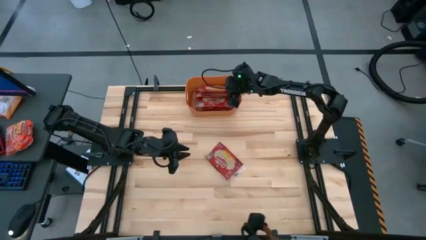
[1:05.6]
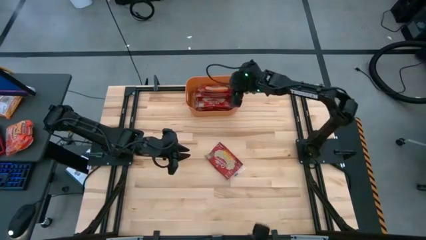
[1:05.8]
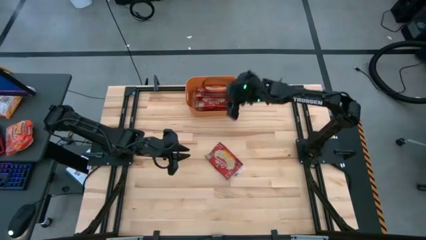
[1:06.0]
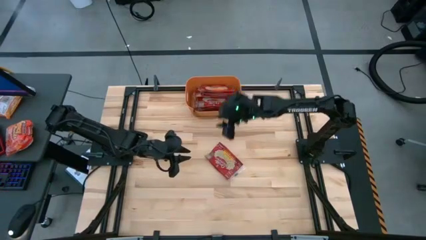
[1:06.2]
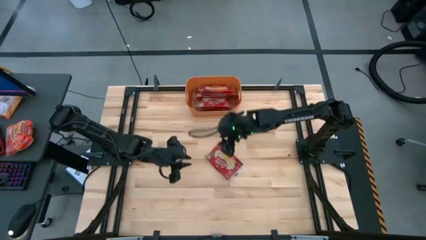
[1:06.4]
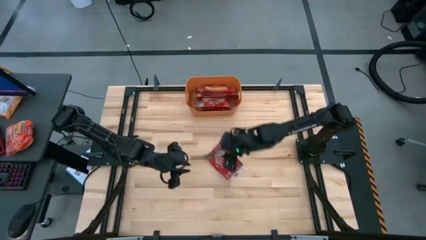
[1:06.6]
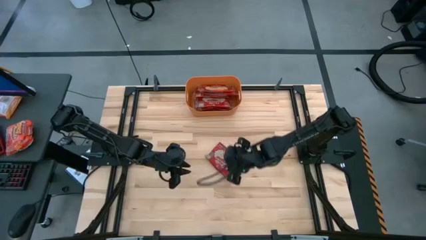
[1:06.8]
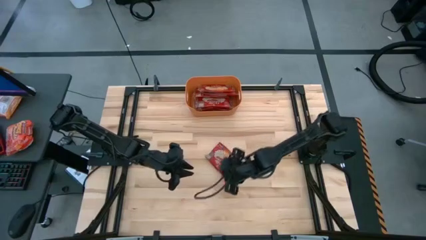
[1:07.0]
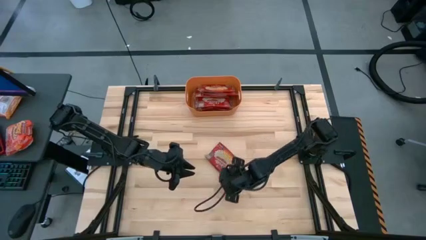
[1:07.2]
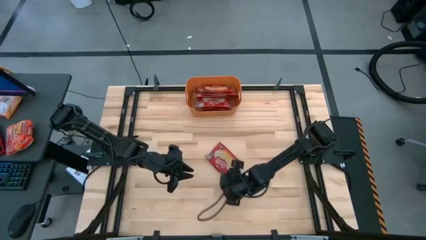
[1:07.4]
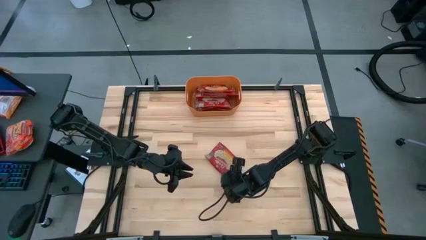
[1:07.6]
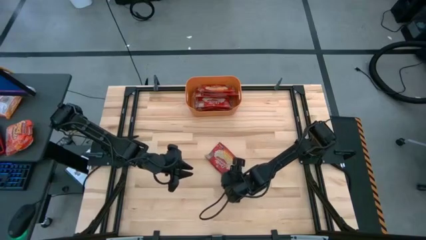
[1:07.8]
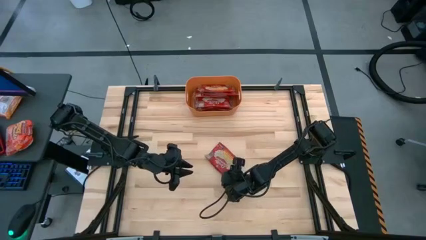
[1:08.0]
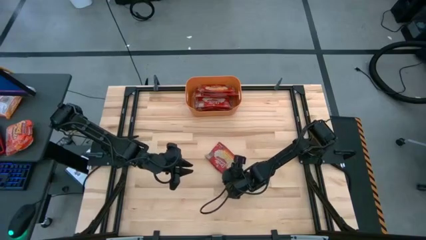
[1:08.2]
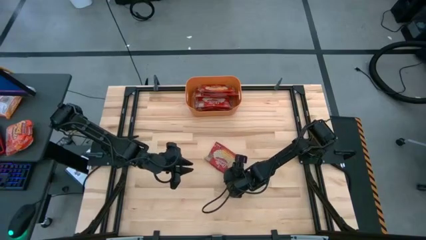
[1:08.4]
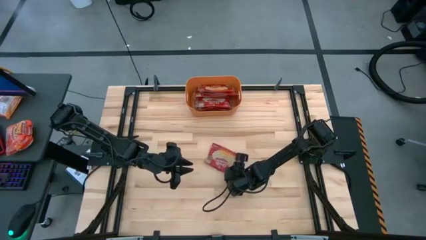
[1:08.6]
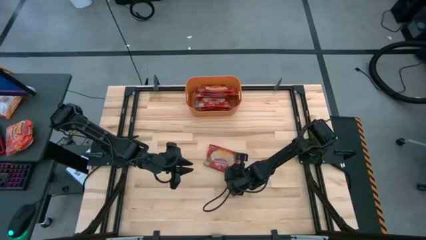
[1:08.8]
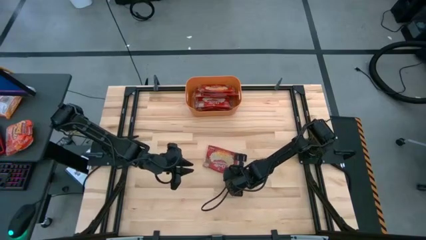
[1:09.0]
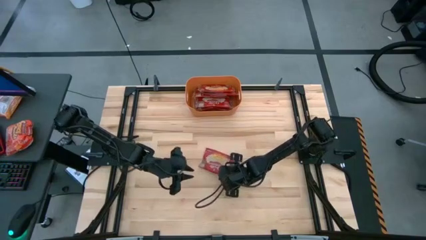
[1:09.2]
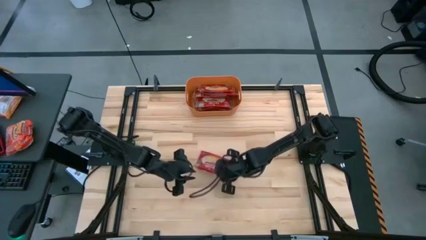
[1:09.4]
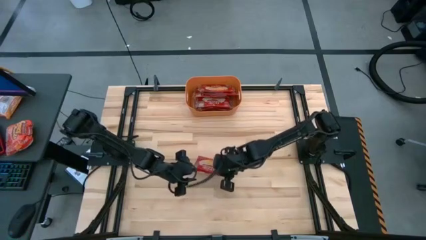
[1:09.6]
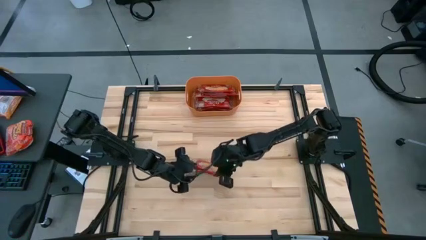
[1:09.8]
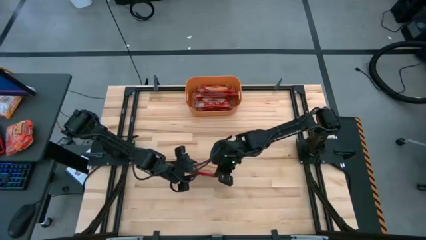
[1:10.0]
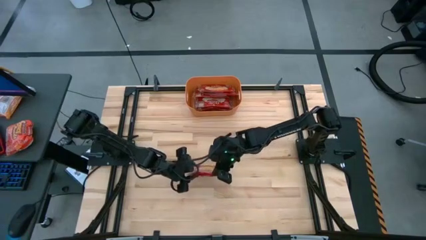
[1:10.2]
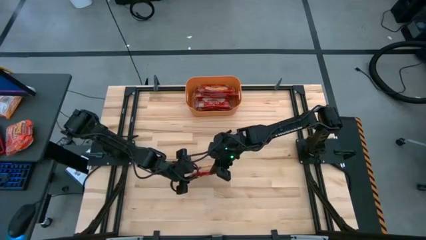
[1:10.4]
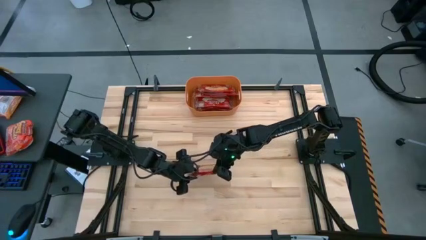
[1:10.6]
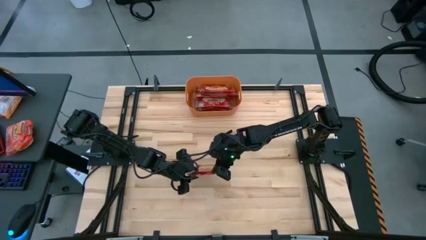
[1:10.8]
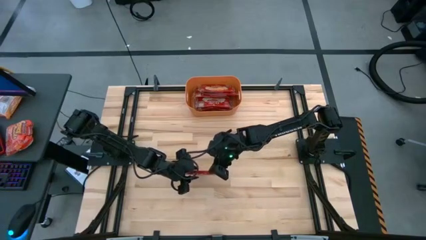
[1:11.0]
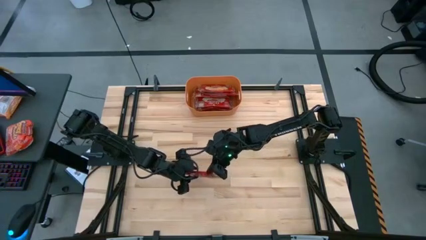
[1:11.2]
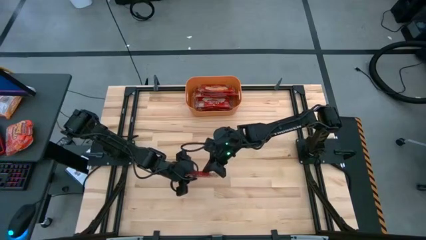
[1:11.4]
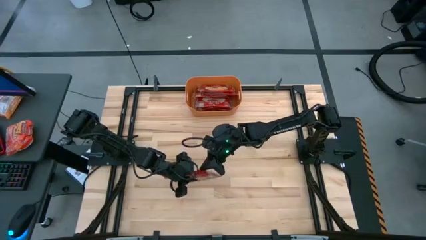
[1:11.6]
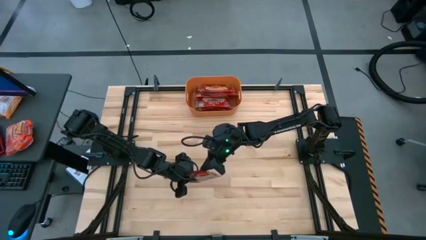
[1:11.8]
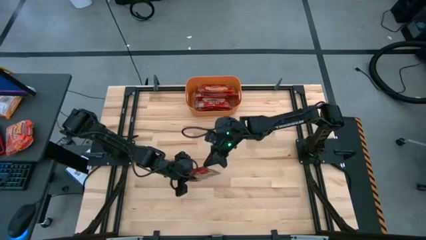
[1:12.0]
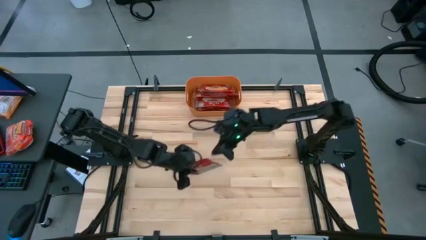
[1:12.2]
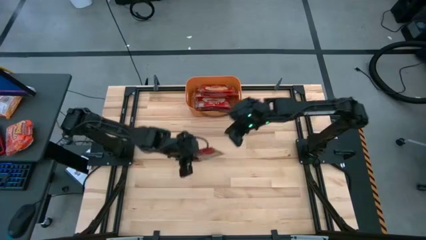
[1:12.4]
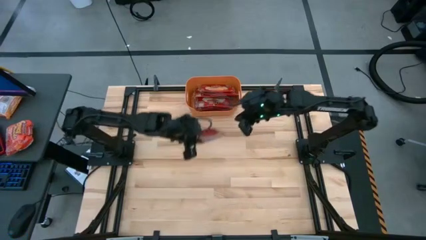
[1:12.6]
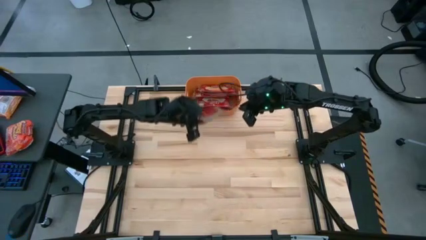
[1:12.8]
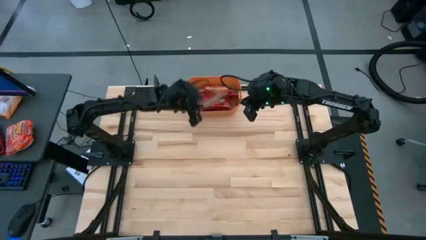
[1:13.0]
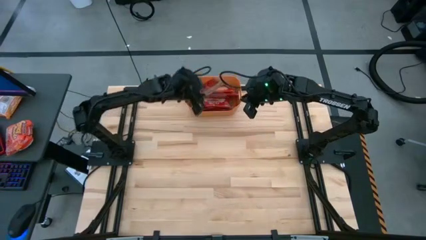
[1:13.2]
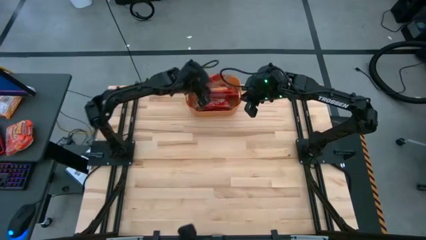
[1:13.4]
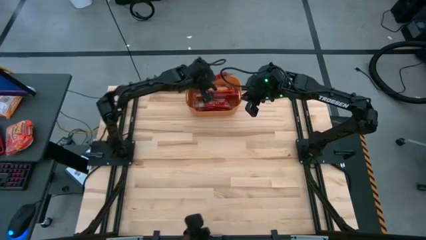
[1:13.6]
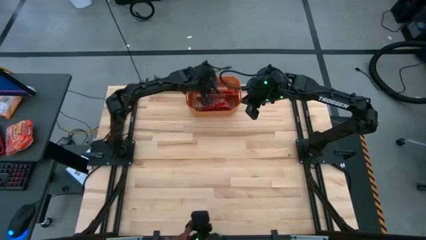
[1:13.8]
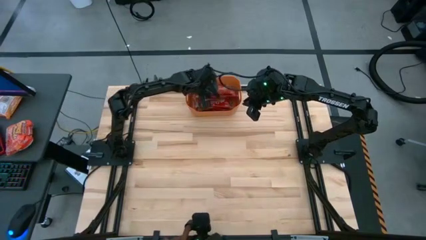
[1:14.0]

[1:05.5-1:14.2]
Task: Sort popcorn bags into baskets
Put the red popcorn bag into the orange bin

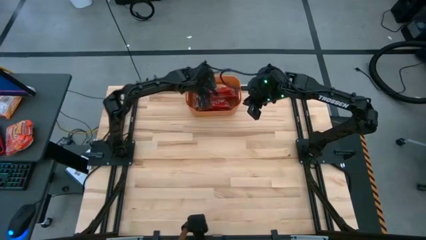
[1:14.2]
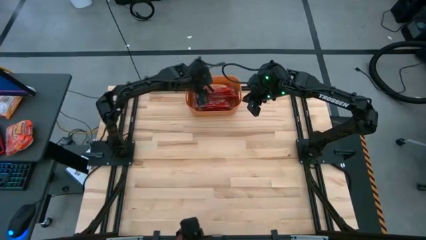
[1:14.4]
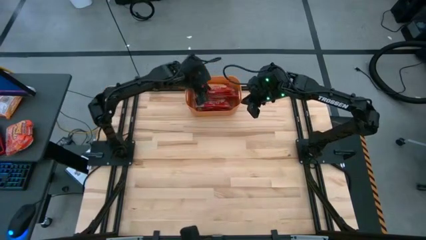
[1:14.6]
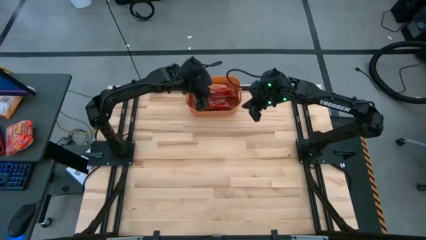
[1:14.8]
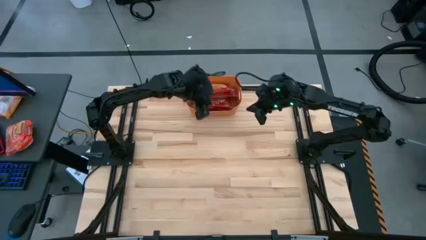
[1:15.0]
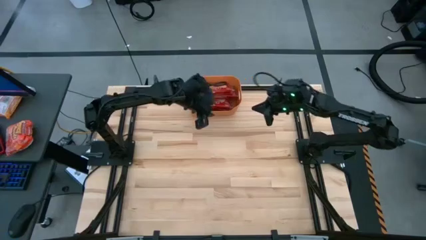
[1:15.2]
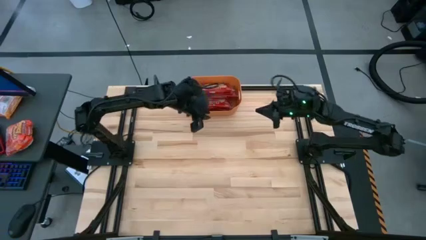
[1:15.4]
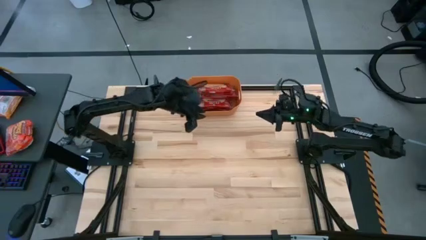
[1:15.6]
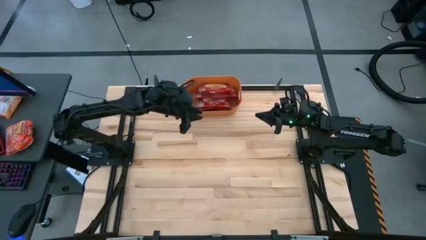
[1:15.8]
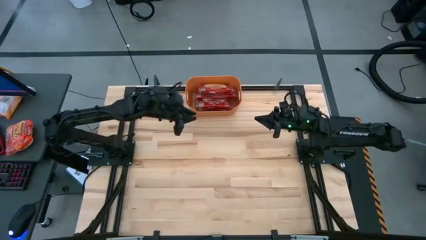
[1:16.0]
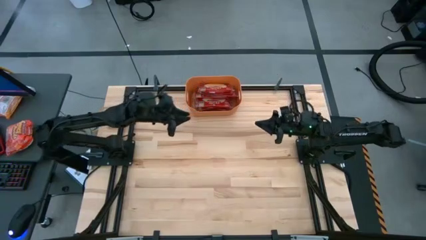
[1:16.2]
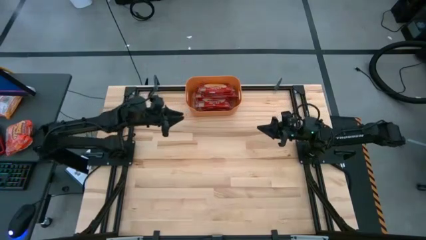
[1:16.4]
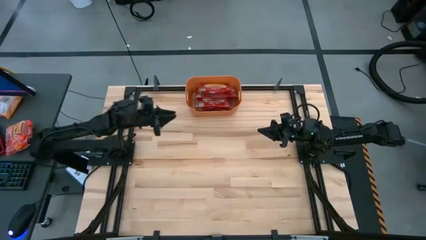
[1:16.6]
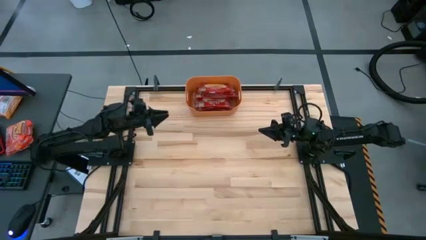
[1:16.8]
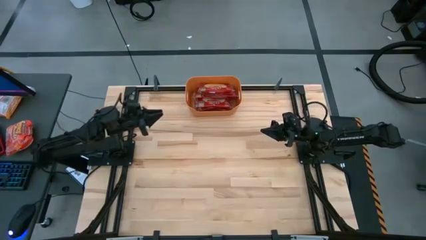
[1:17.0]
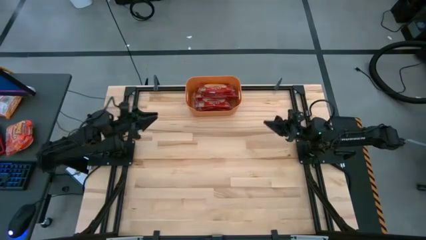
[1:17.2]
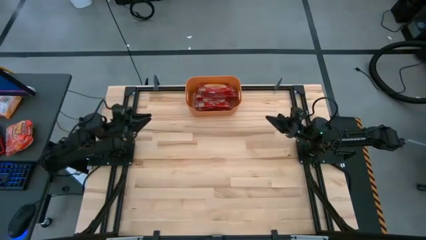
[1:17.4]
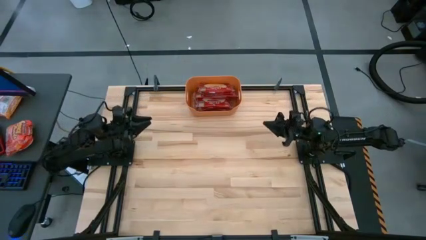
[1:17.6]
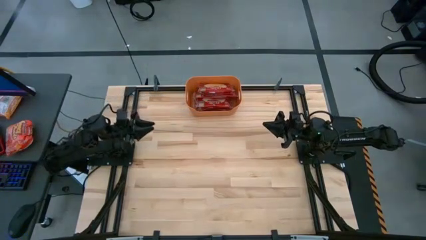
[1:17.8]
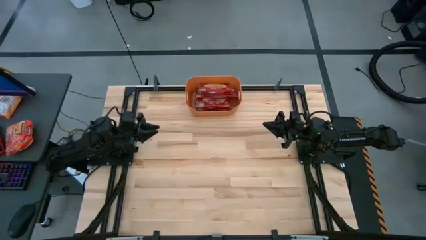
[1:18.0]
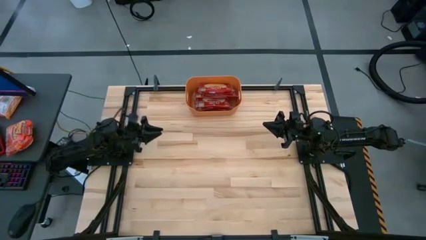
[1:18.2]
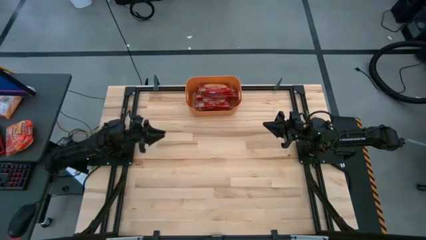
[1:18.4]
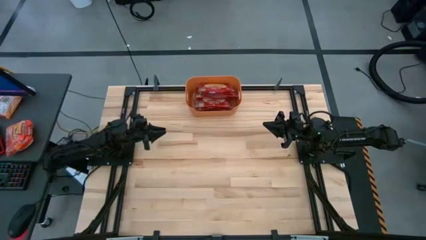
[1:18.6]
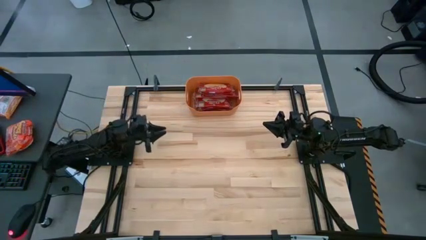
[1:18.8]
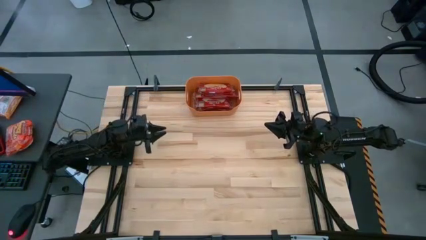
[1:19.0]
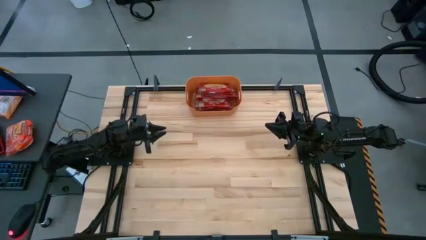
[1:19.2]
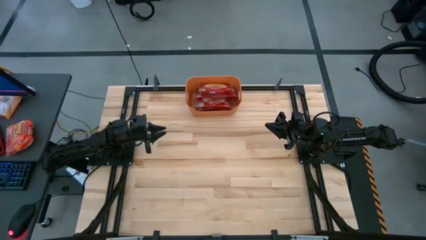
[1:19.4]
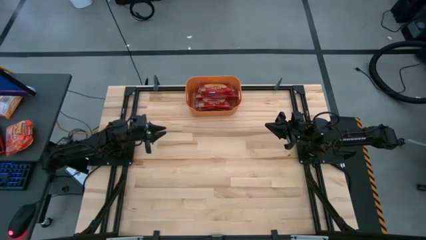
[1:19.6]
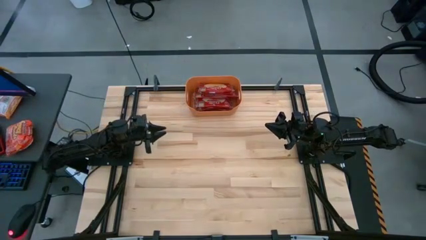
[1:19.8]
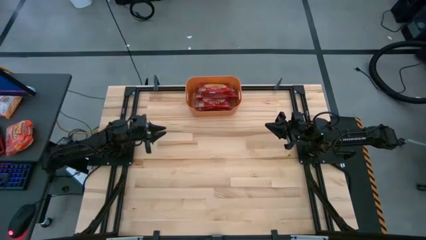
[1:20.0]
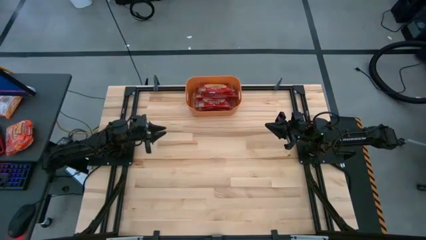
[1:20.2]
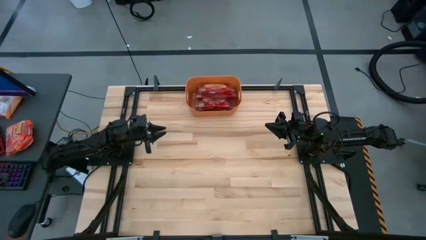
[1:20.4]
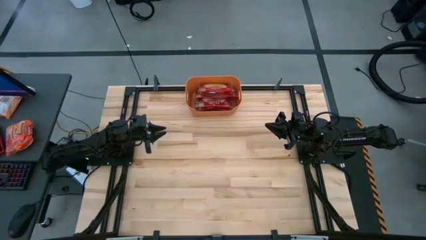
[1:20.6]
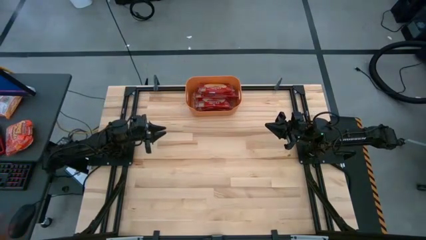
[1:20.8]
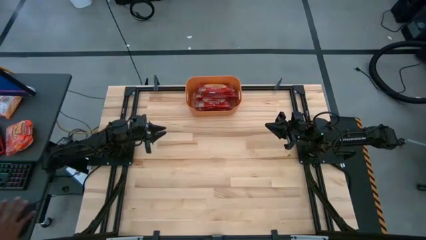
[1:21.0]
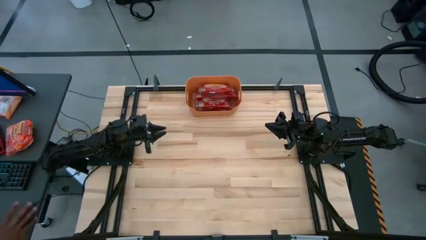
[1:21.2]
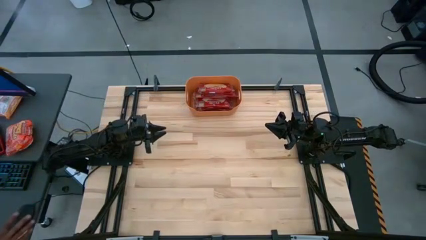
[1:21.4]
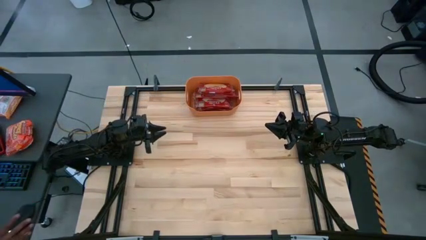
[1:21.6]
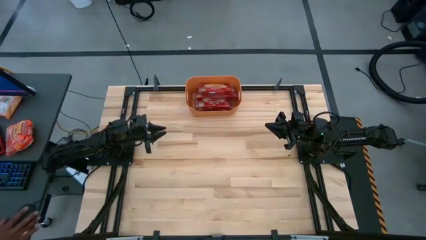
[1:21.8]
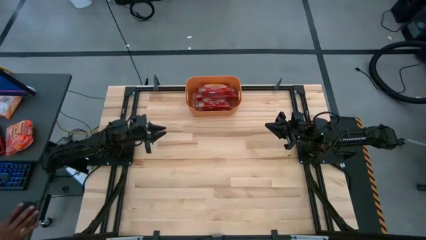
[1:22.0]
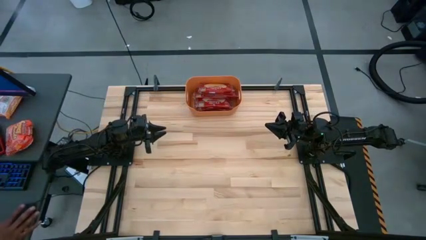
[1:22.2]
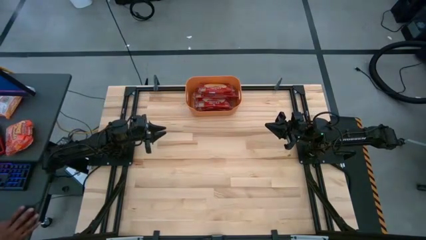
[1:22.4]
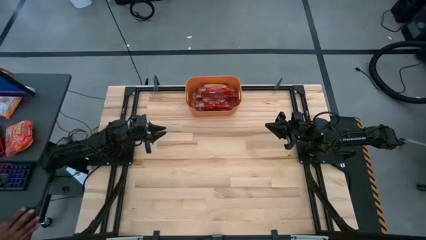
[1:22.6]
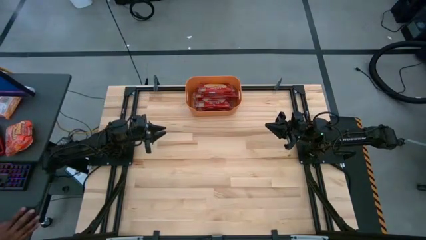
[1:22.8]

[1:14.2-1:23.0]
Return to Home Position
